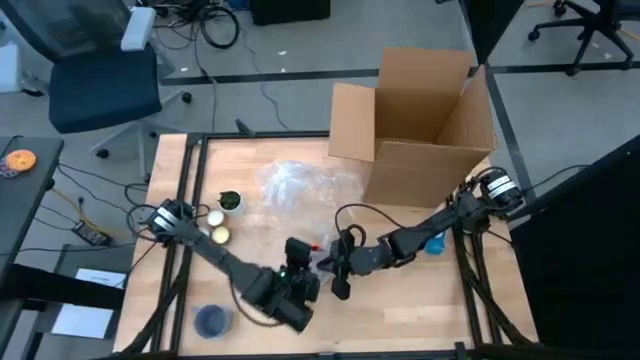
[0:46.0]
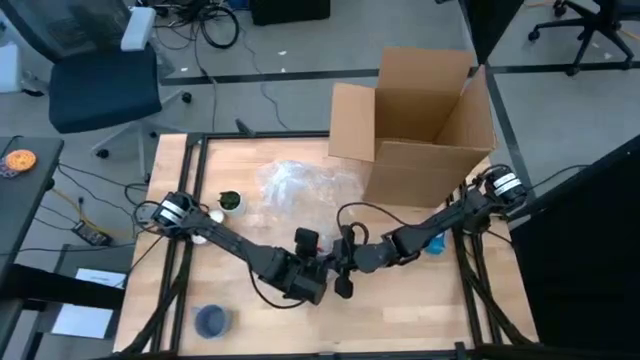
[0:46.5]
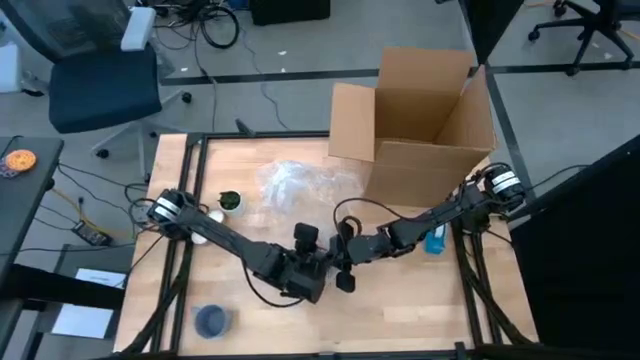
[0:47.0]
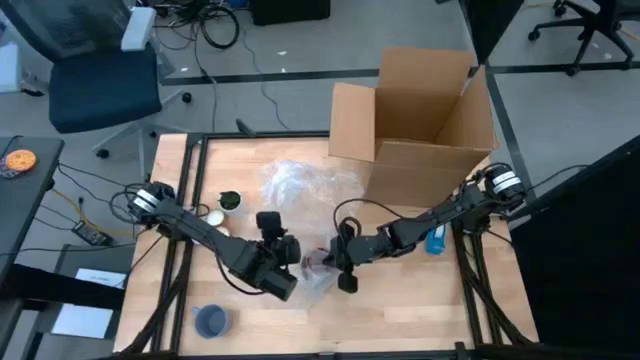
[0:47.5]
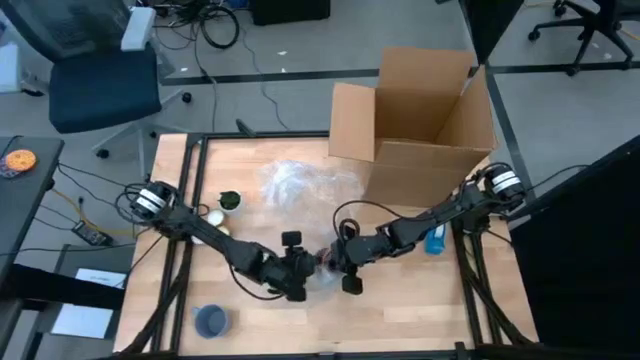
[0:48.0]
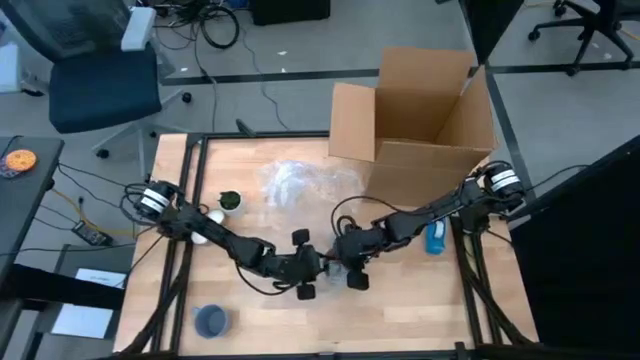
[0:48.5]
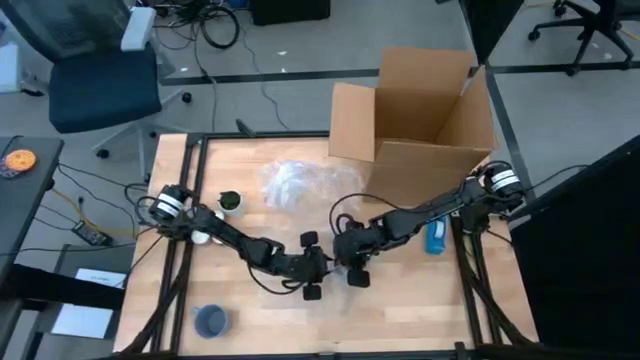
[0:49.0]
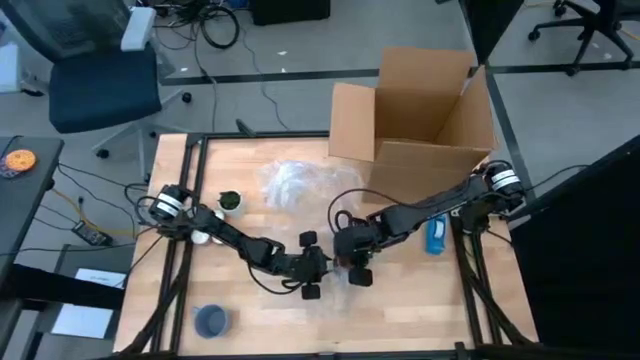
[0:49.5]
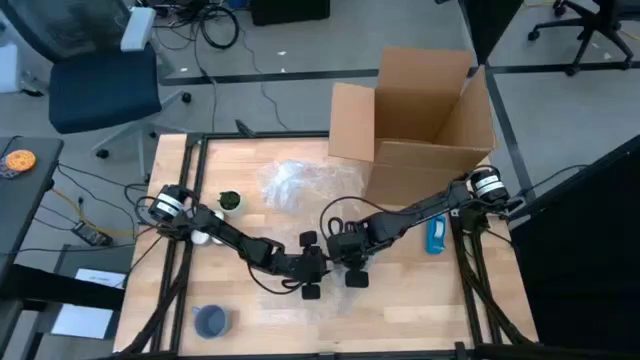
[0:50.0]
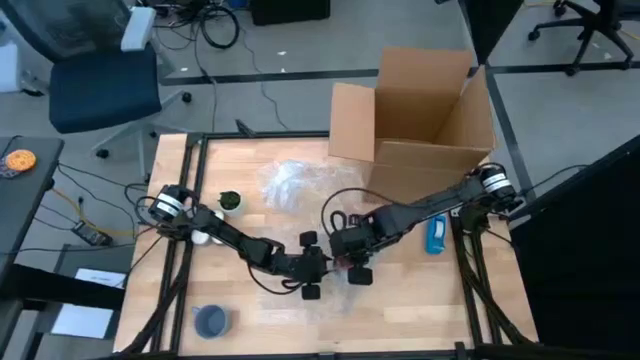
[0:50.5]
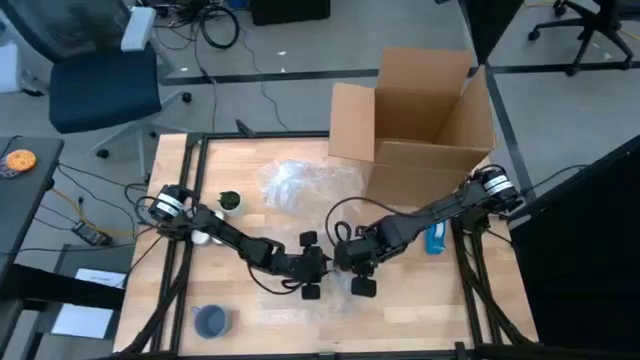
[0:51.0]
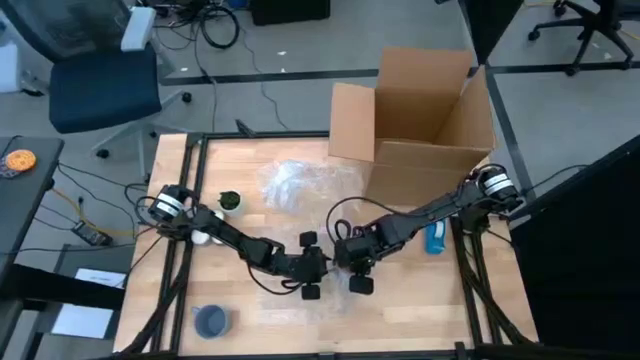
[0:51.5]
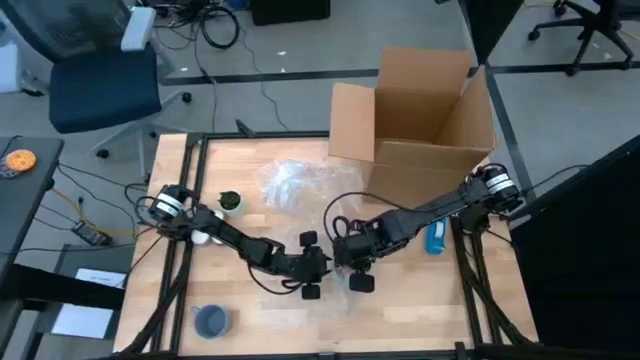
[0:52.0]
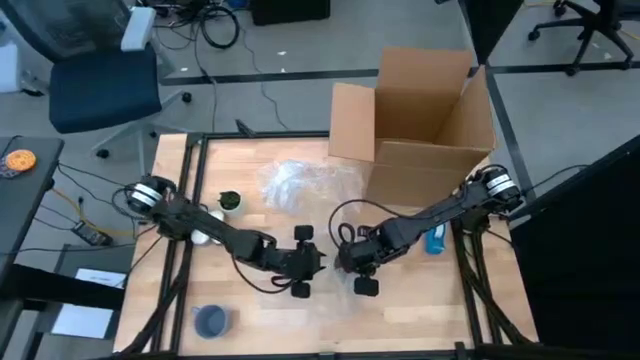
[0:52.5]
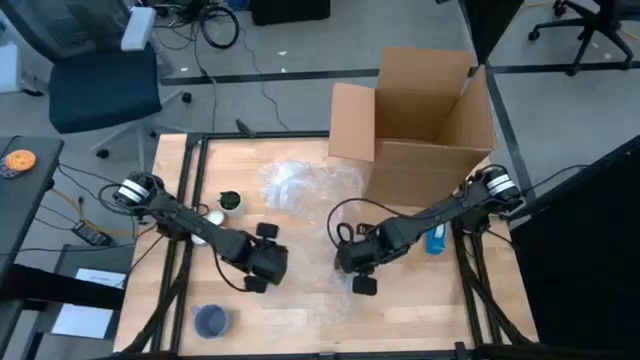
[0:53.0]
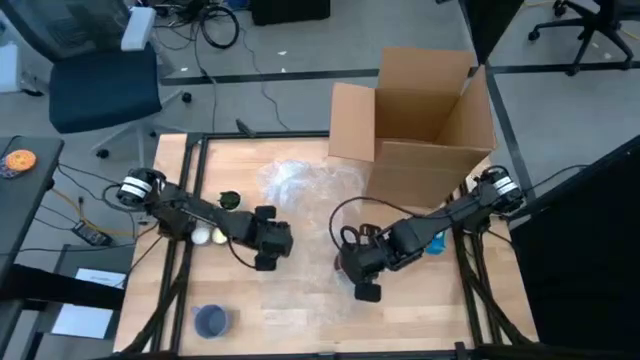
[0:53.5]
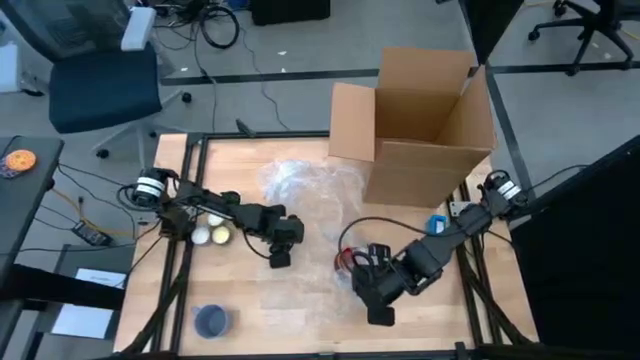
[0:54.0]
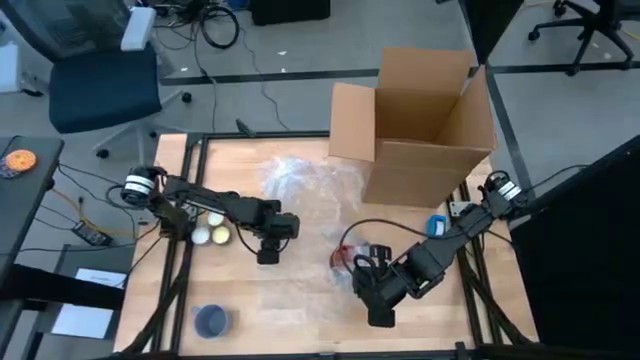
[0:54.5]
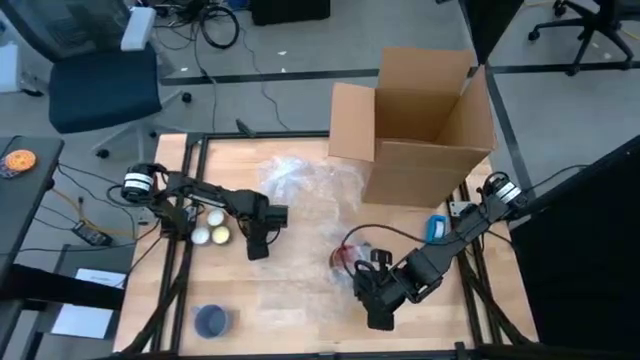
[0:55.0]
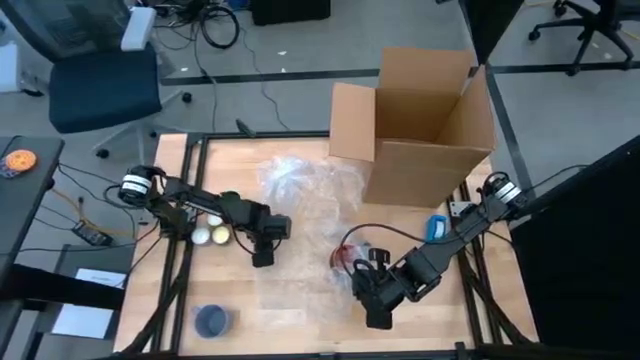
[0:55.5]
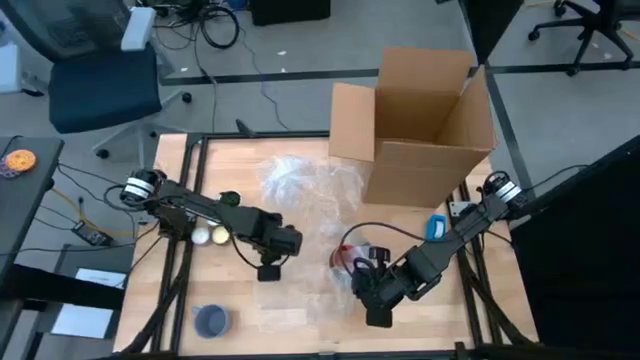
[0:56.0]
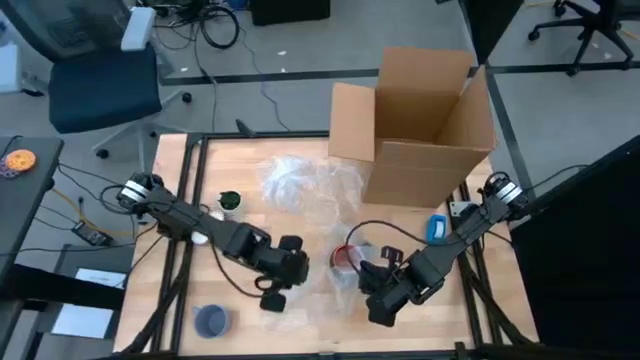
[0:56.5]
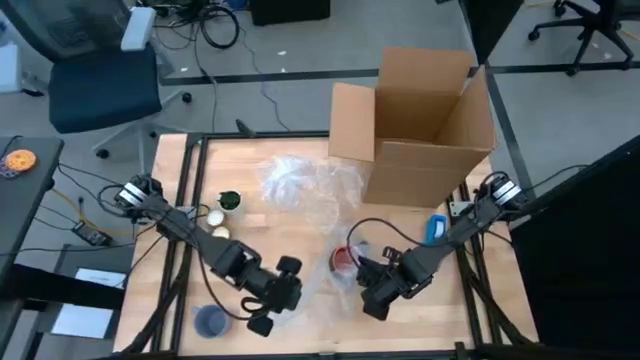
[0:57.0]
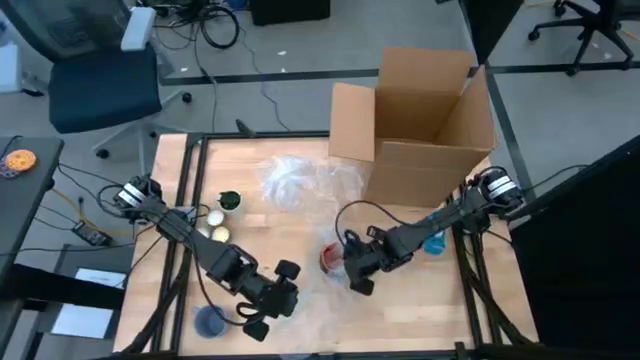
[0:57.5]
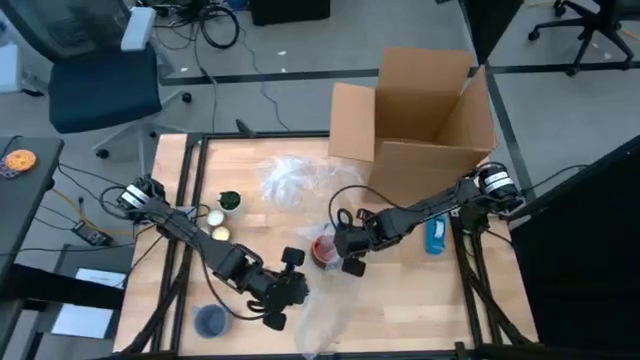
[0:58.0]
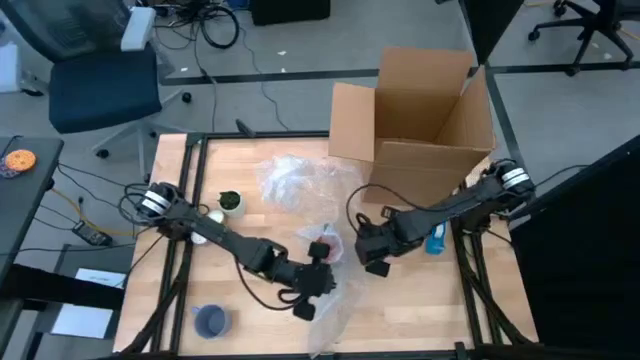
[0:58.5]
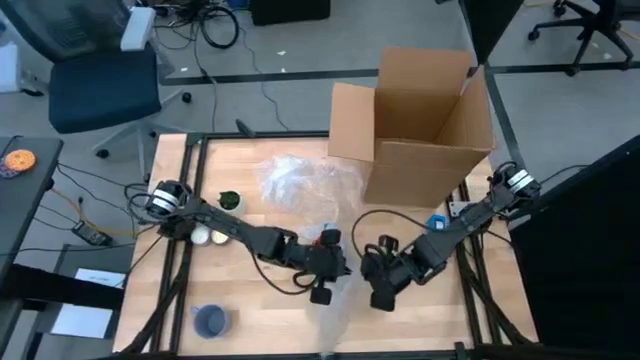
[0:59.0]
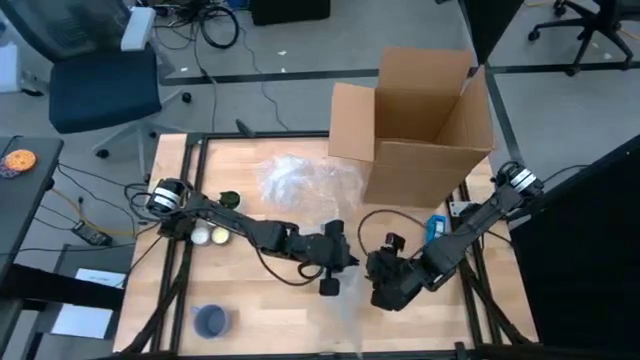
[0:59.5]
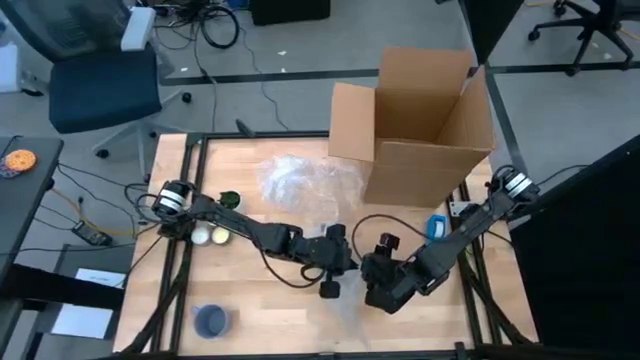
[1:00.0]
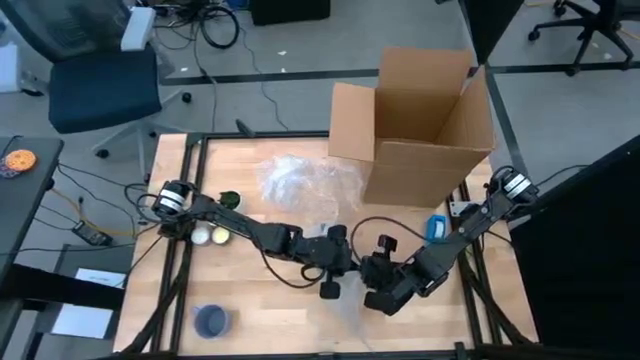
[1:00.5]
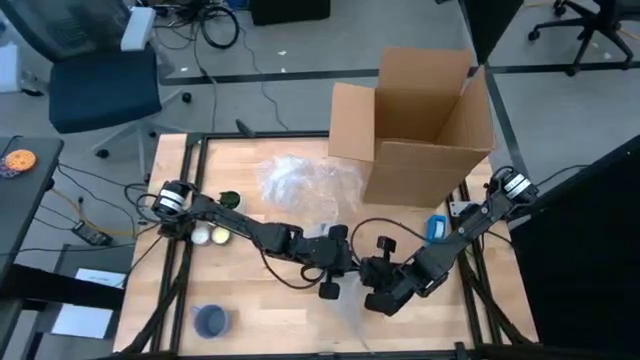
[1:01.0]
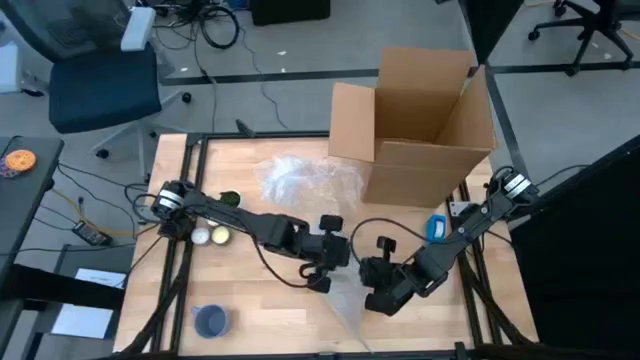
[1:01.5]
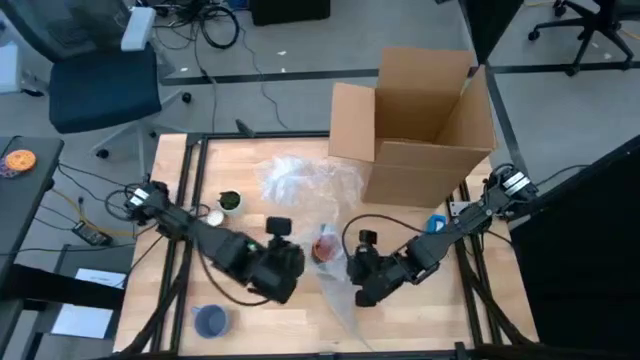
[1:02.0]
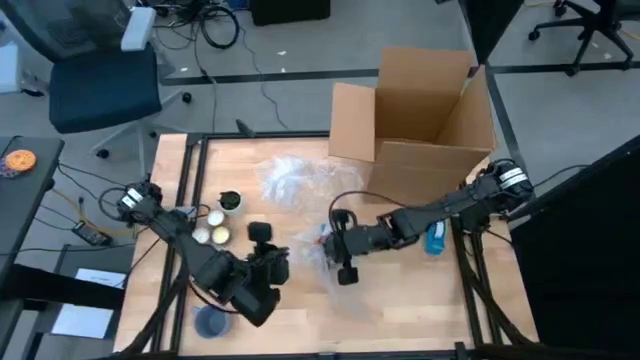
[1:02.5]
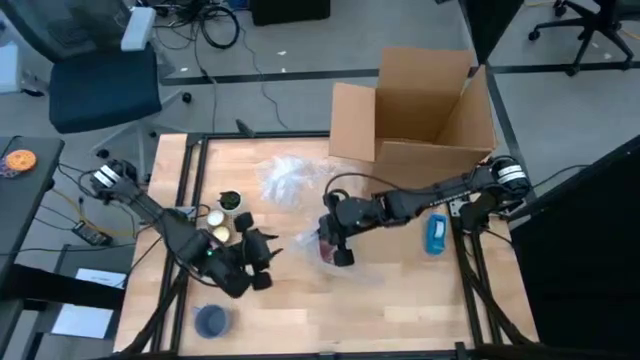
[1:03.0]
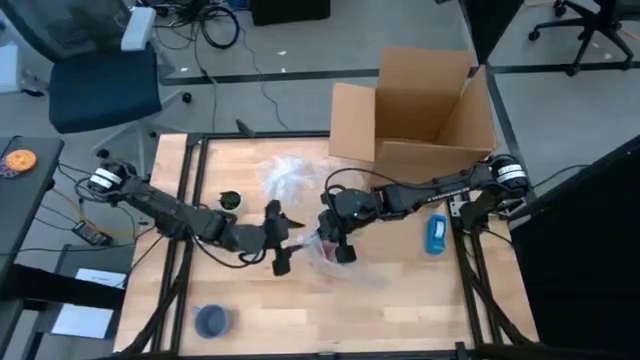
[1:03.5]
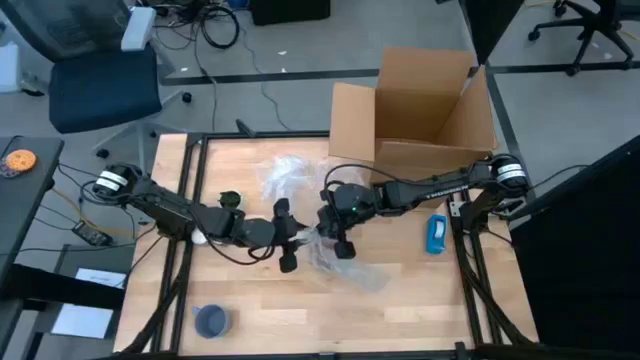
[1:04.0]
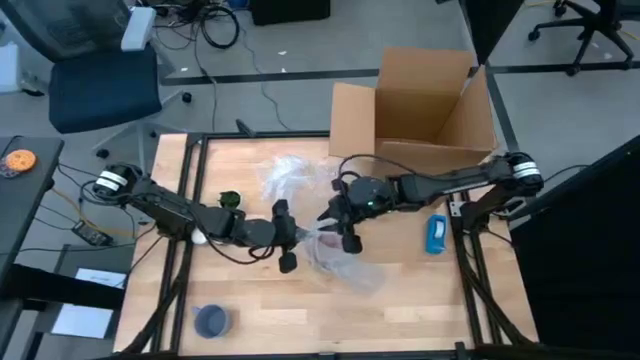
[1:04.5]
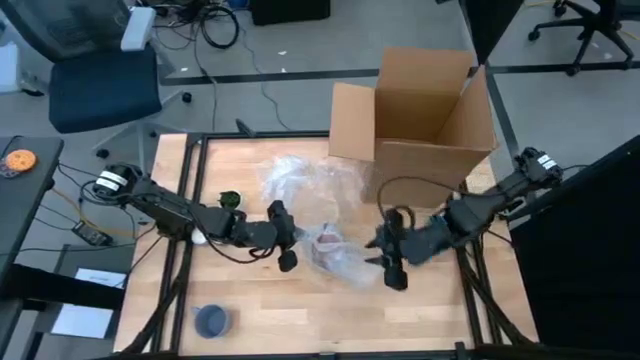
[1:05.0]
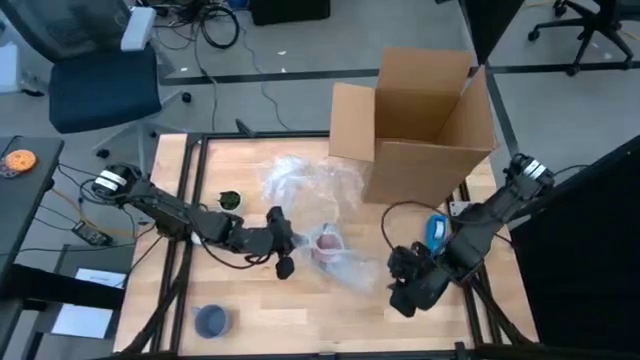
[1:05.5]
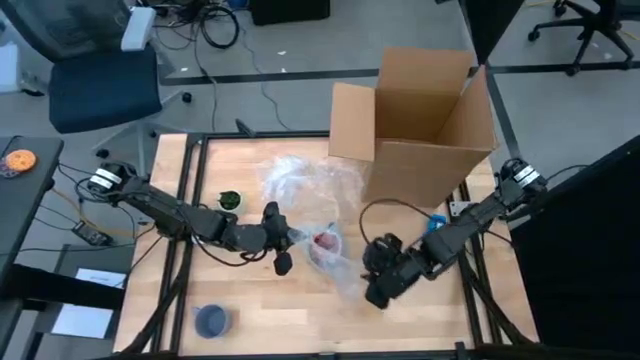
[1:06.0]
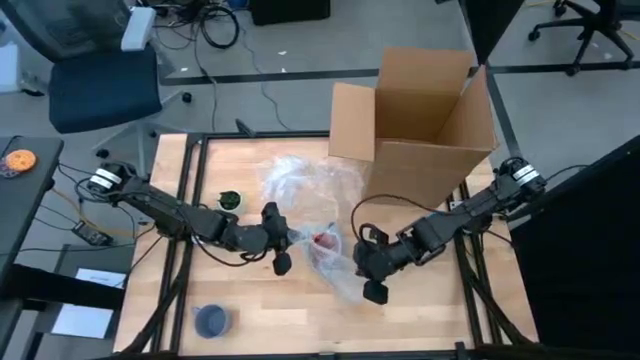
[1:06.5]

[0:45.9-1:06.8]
Task: wrap mug
Wrap the black mug with bubble wrap
